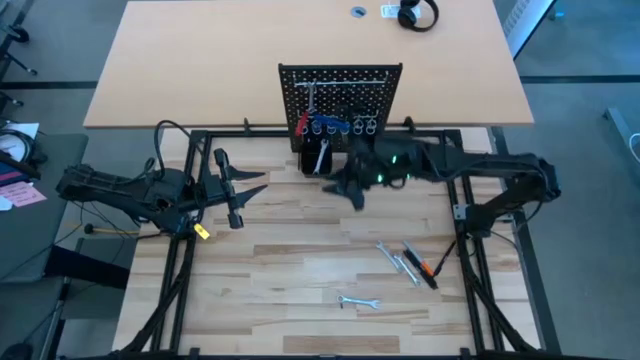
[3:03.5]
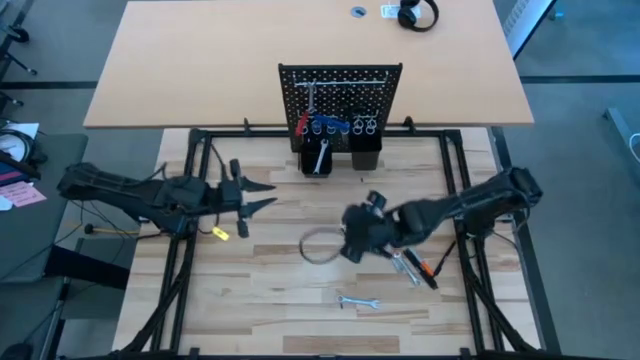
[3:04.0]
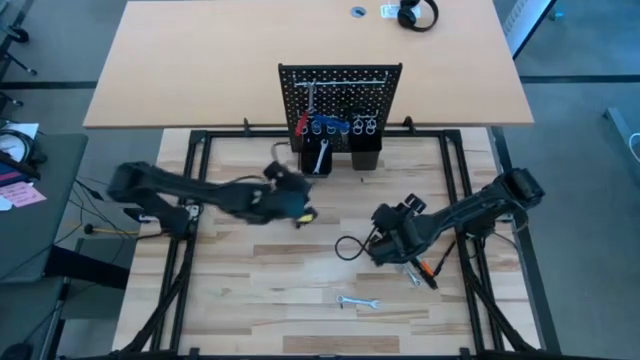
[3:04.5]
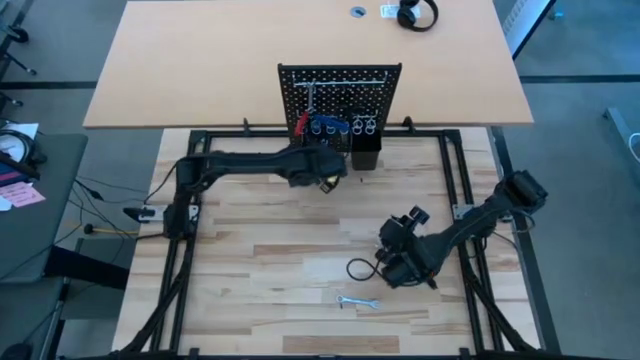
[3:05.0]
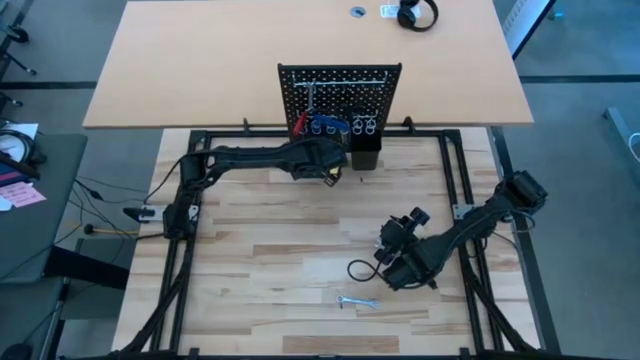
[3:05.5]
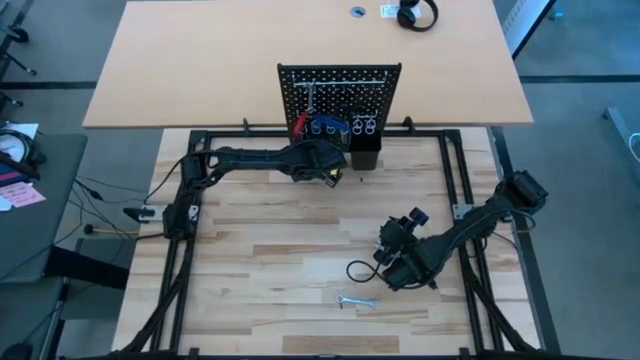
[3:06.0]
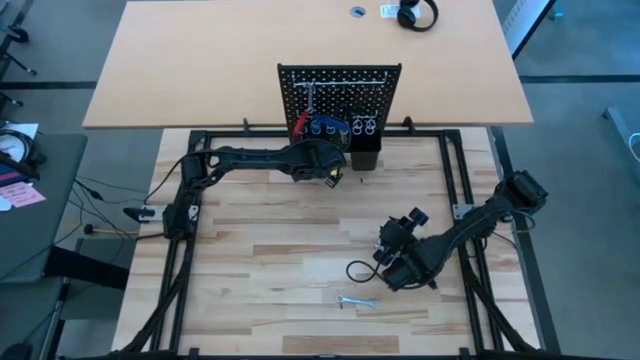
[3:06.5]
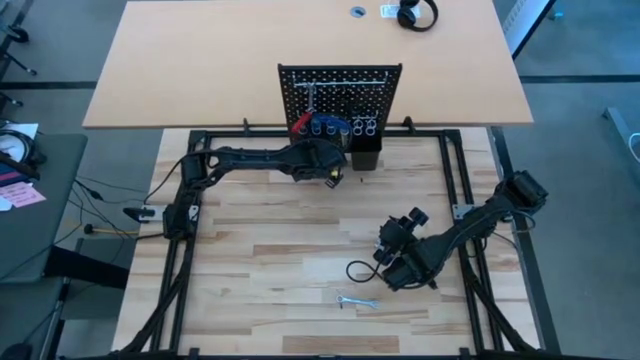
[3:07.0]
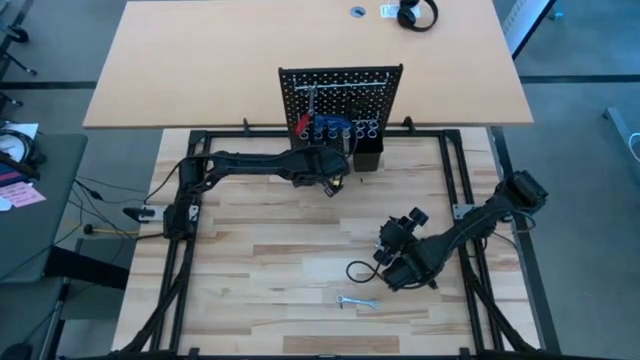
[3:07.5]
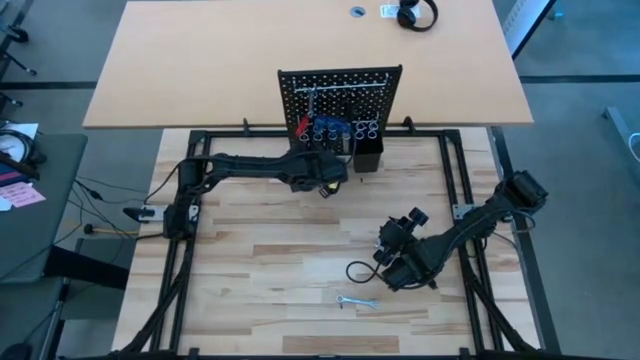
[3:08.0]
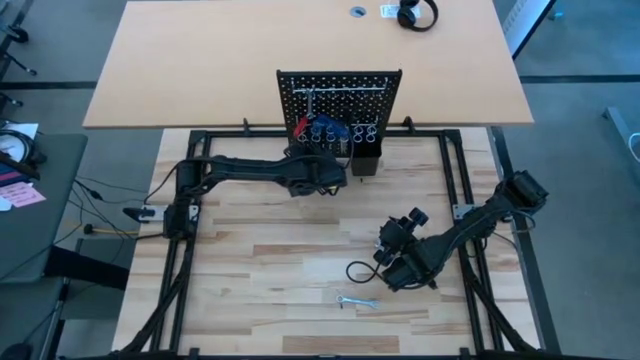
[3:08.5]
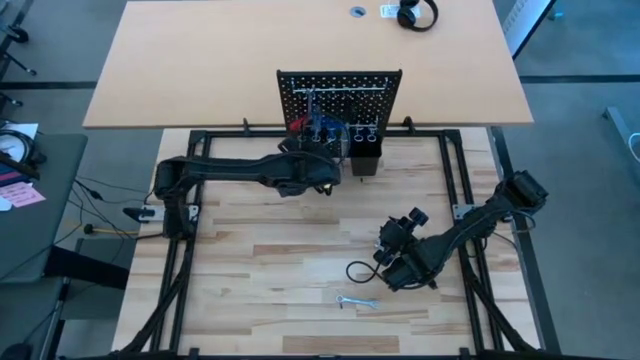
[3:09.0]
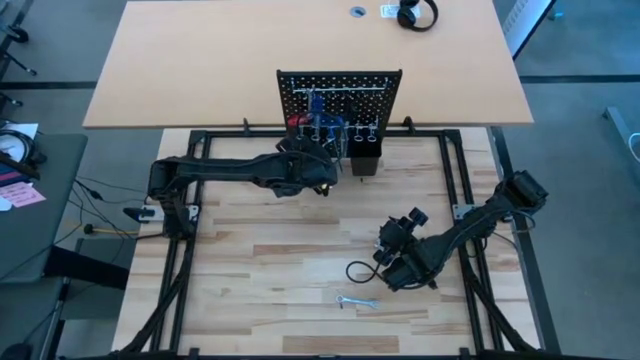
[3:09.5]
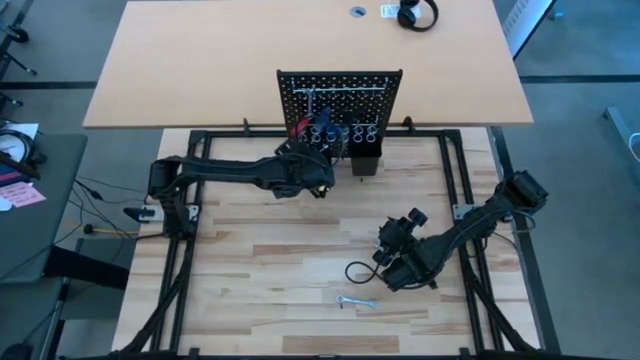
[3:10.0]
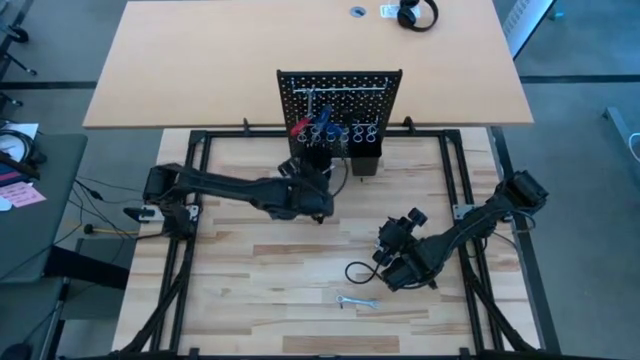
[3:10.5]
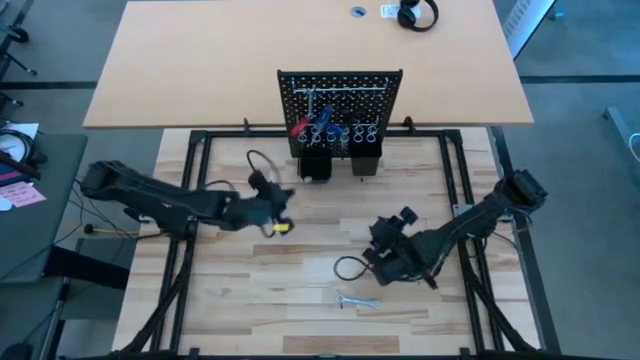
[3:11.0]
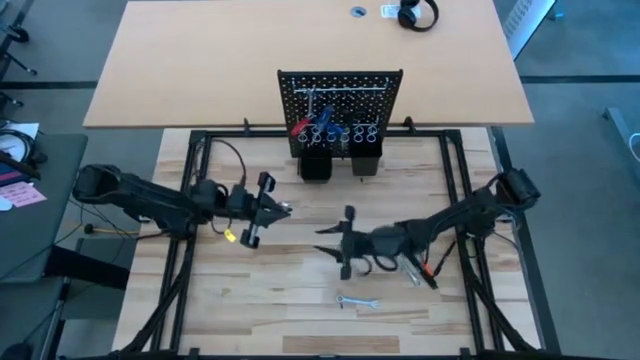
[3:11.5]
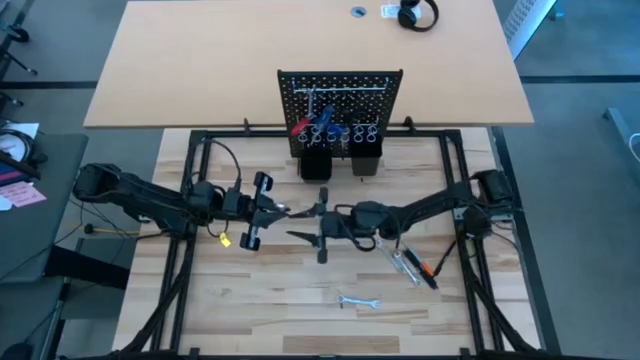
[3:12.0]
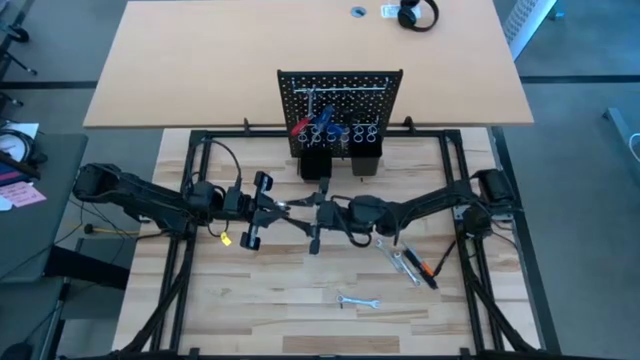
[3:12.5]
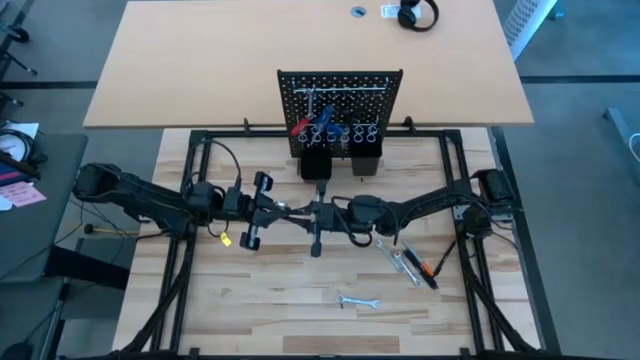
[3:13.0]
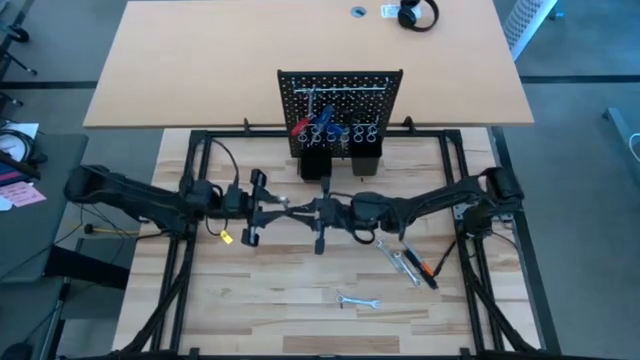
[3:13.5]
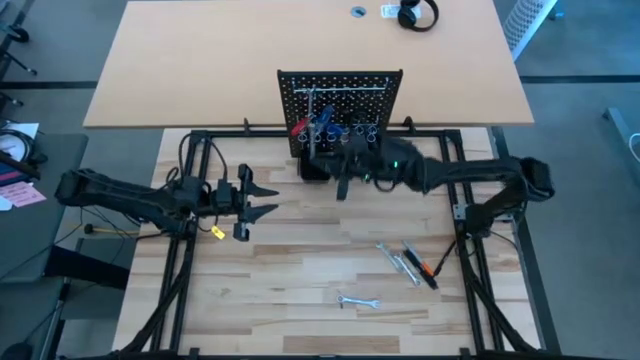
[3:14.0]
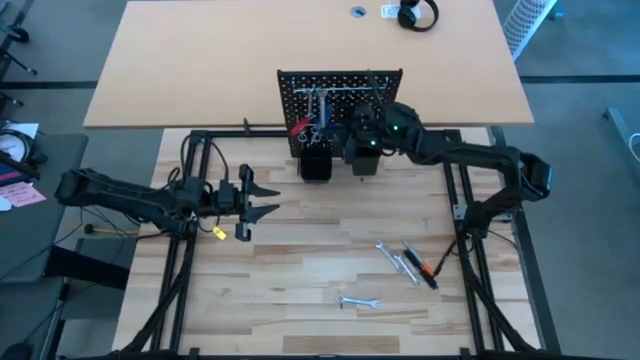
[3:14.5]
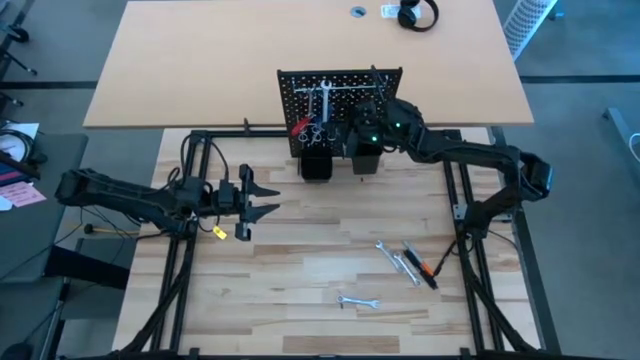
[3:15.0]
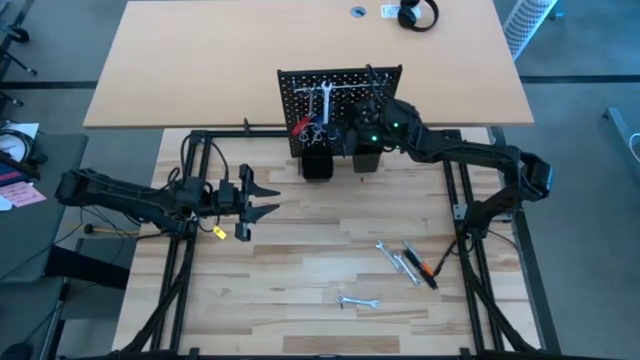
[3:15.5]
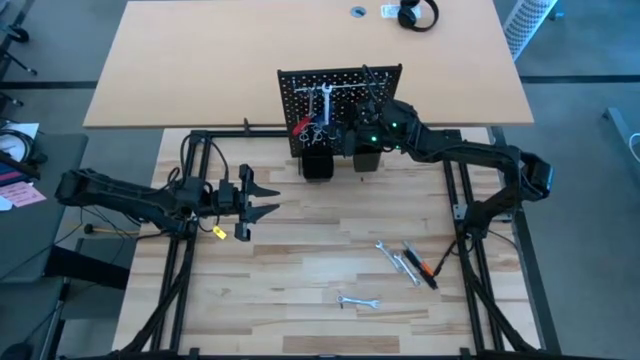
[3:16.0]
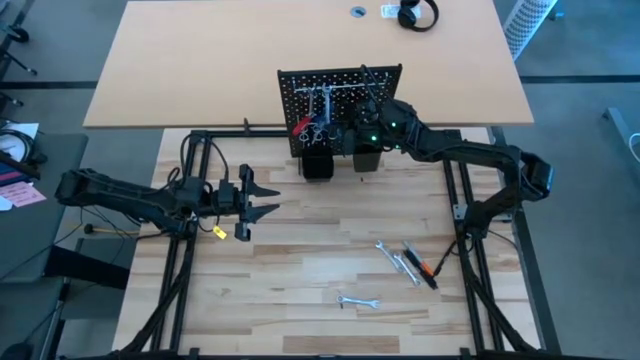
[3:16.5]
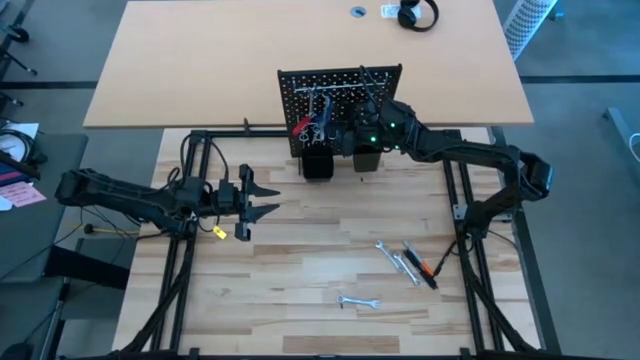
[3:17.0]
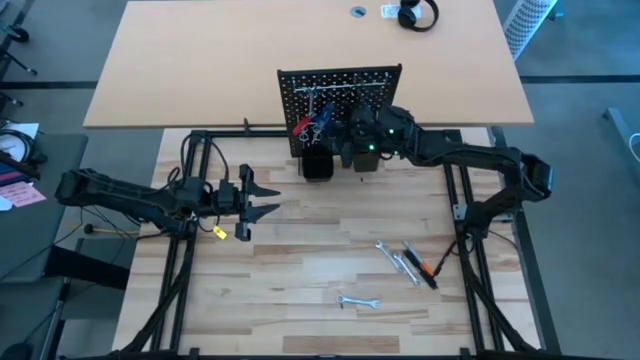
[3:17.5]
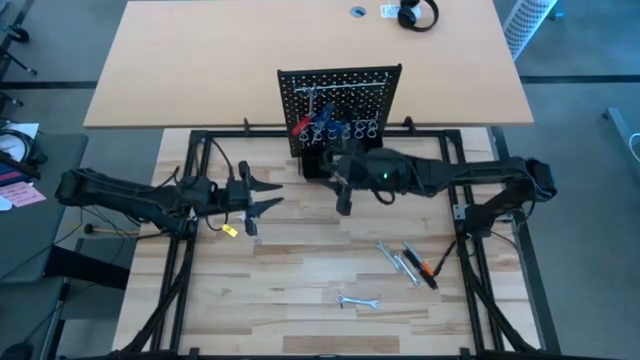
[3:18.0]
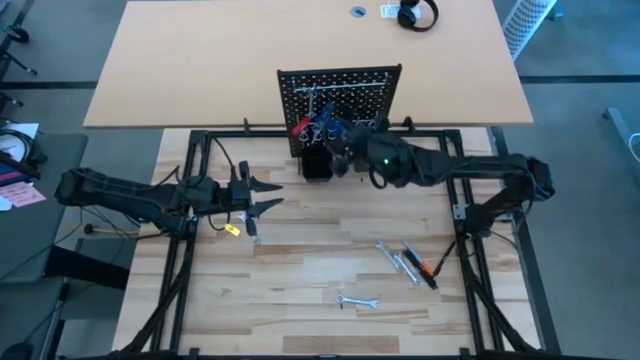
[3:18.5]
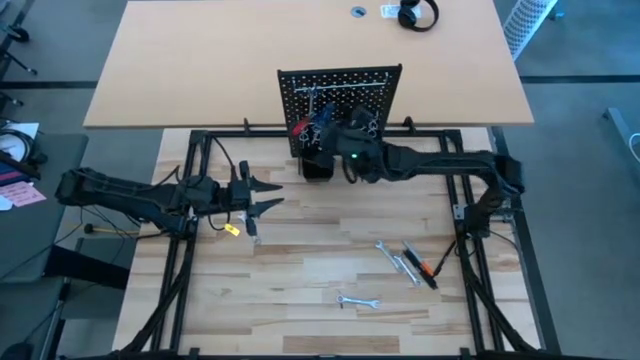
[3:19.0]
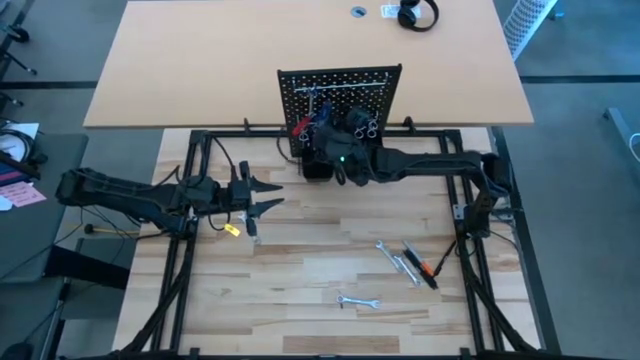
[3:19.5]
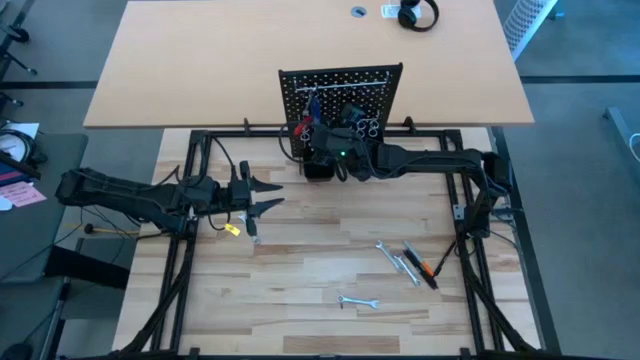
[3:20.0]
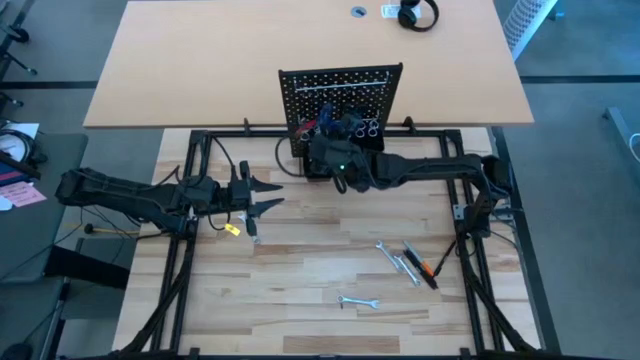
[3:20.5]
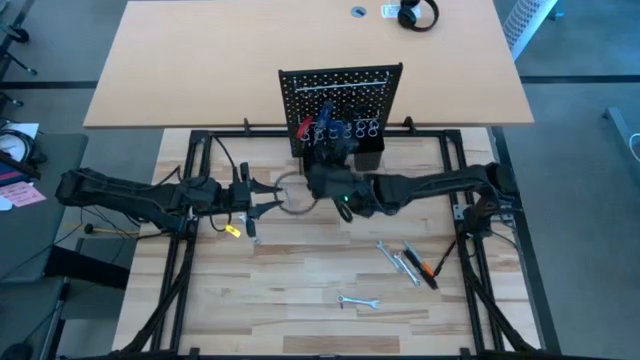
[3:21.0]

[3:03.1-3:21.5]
Task: Hang tools onto peg board
Hang the wrench on the pegboard
